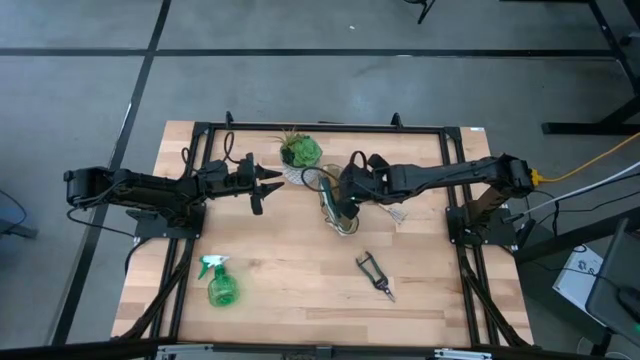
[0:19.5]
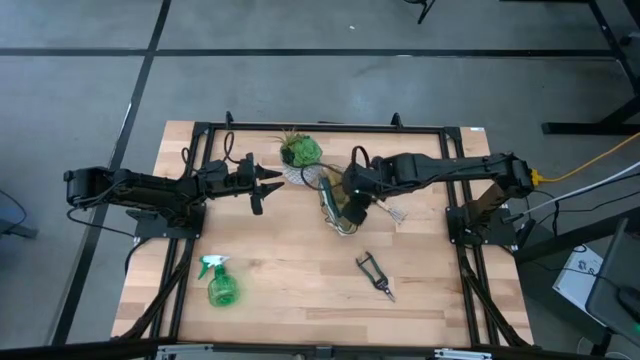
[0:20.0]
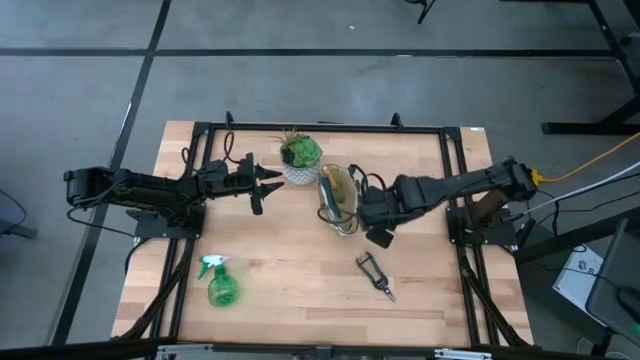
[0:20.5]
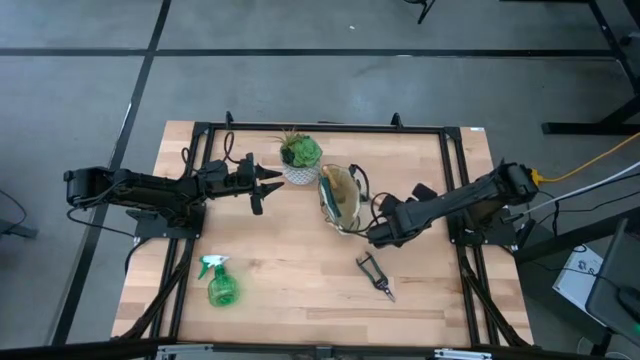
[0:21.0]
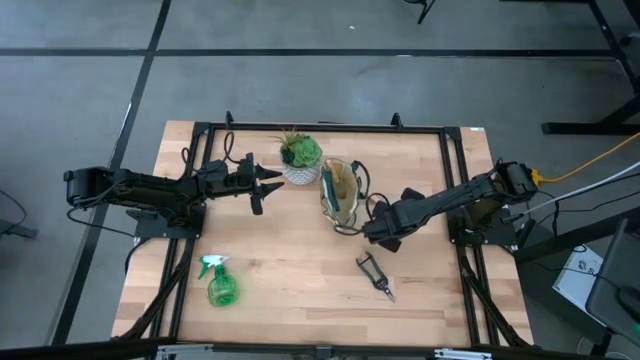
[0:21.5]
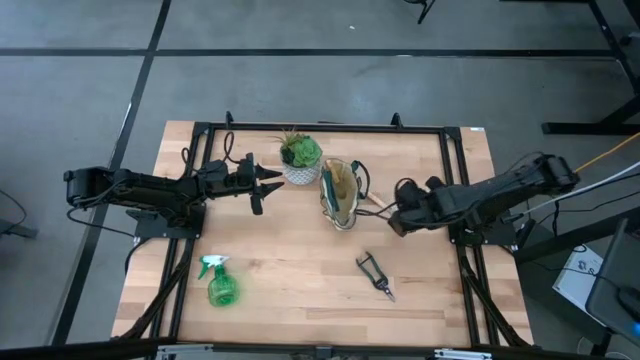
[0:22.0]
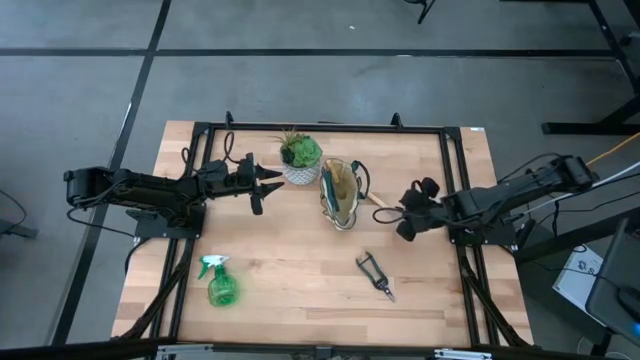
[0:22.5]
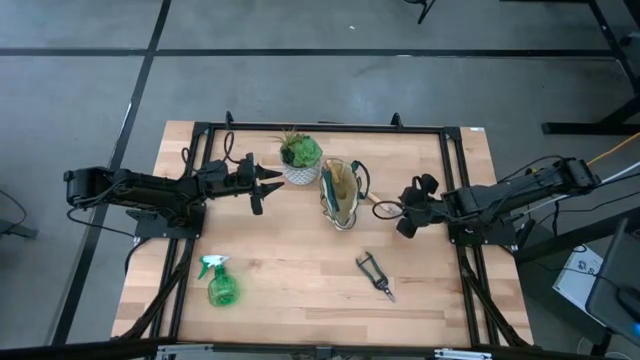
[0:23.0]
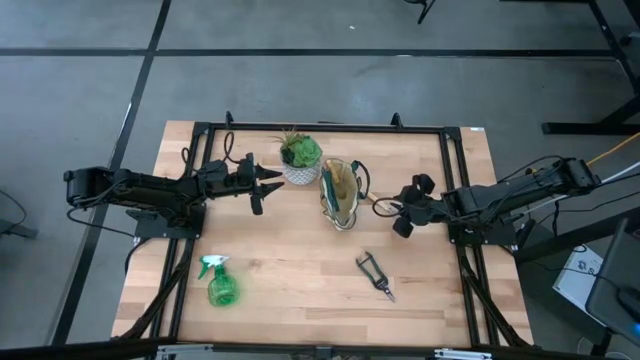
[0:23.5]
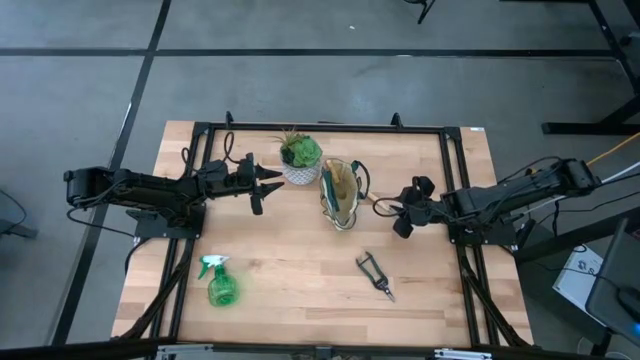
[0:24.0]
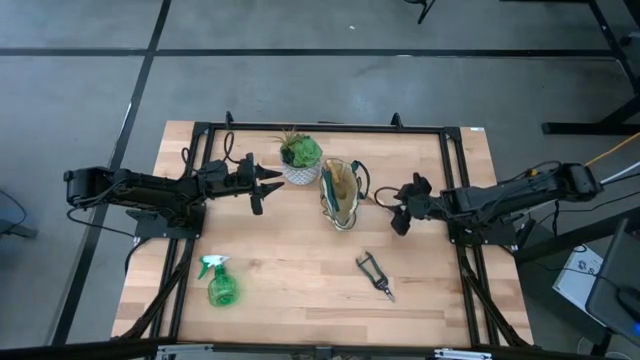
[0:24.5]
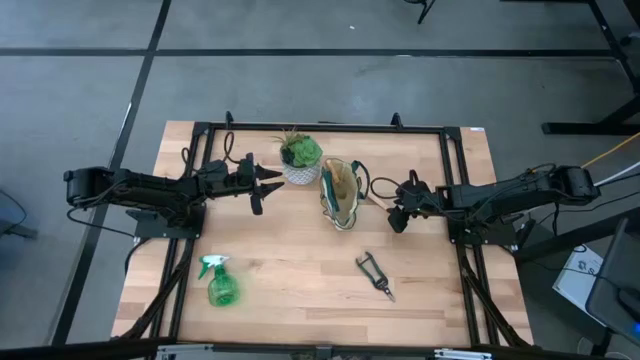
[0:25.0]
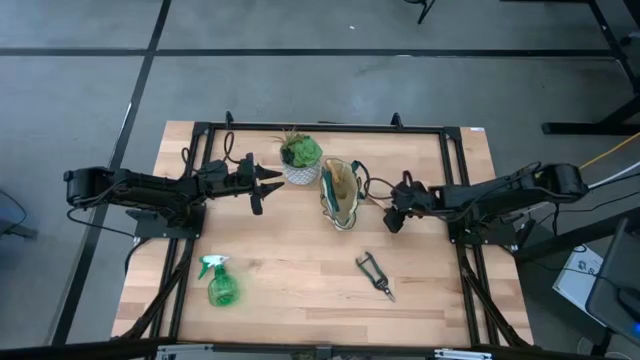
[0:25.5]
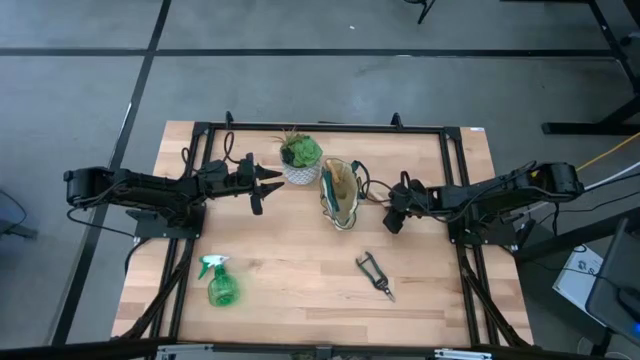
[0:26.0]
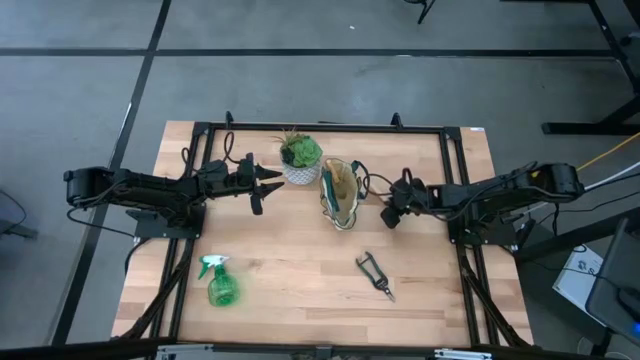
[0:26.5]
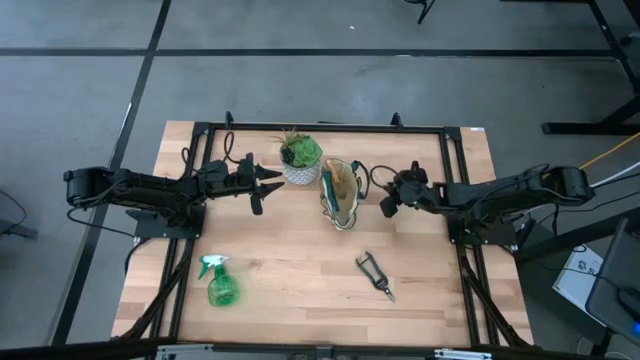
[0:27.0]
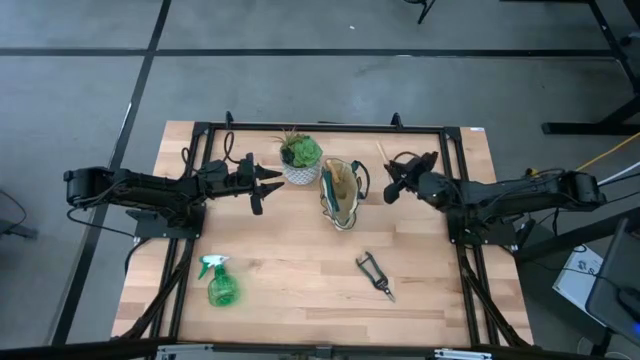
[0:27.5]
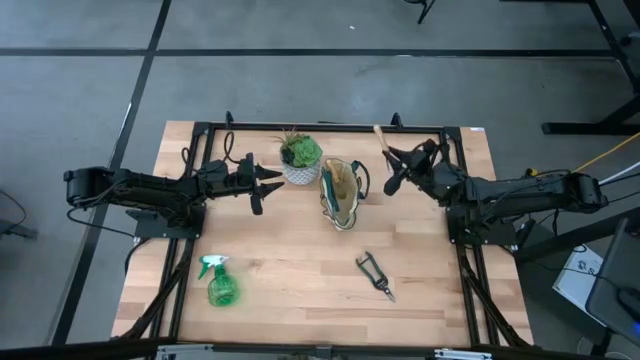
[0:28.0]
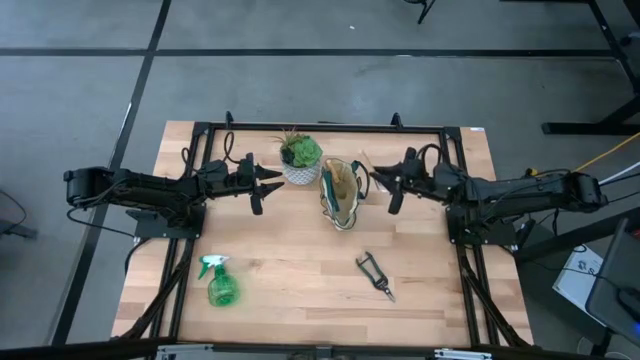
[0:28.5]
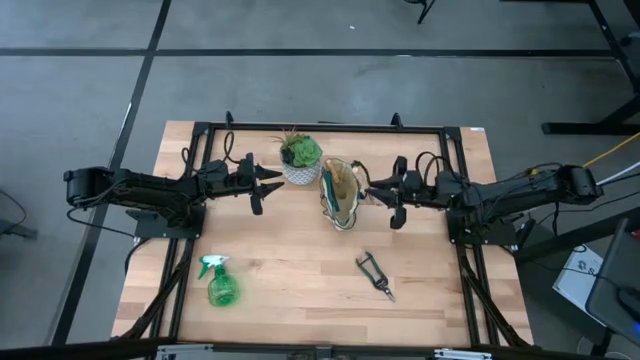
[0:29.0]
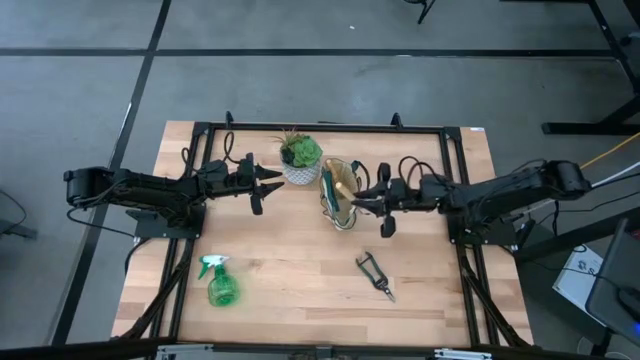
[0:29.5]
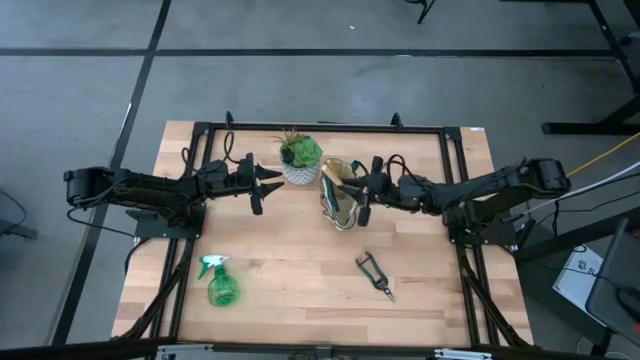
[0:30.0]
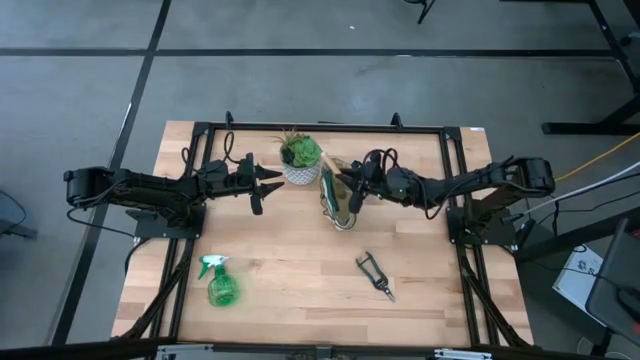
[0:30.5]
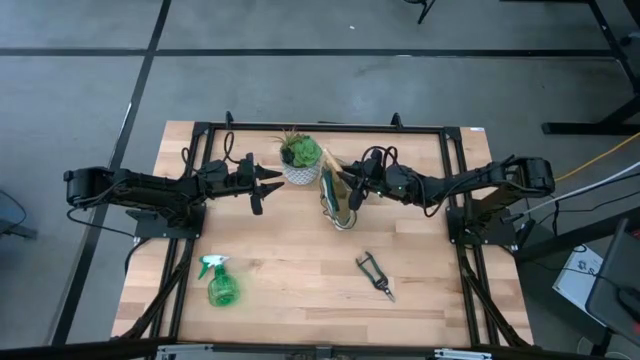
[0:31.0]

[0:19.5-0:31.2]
Task: Pick & Place Garden tools in Gardening bag
Put the hand rake into the gardening bag

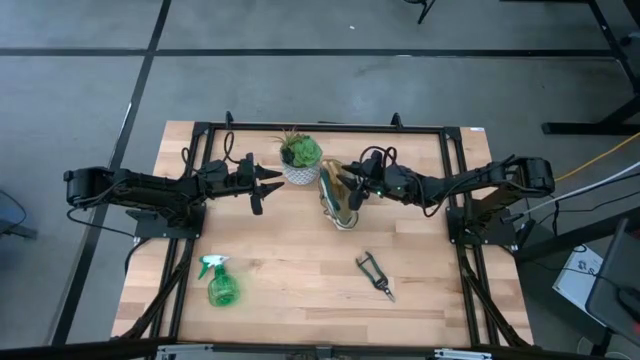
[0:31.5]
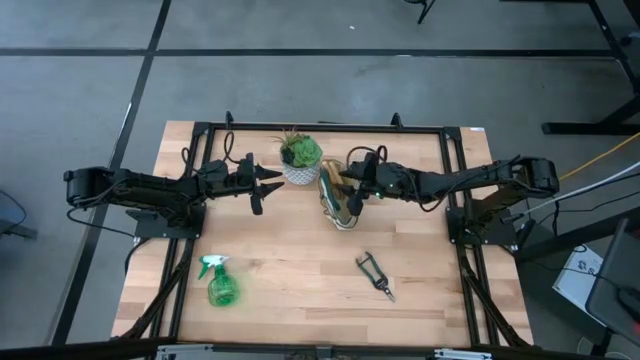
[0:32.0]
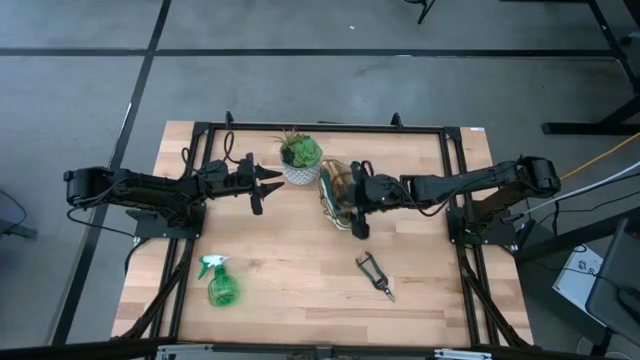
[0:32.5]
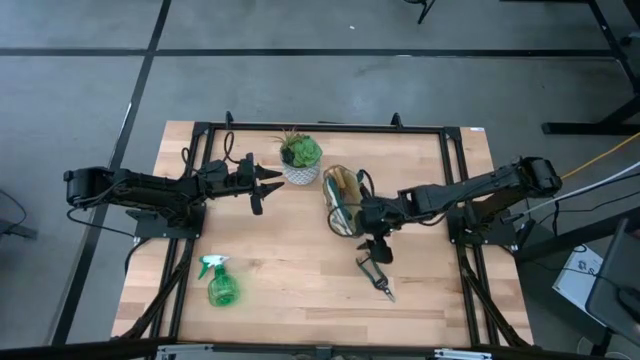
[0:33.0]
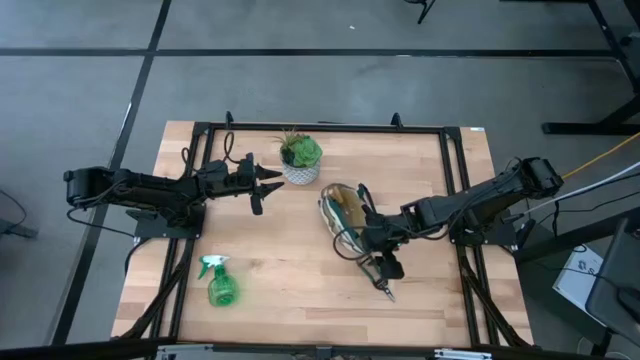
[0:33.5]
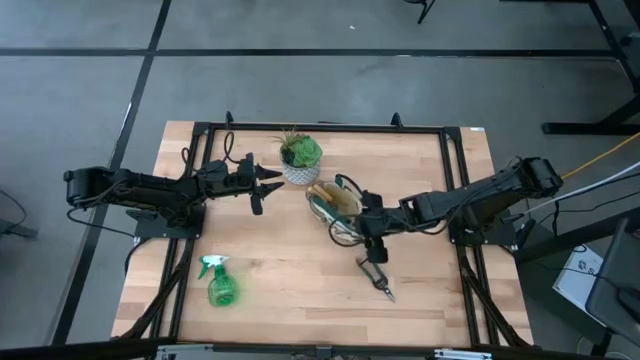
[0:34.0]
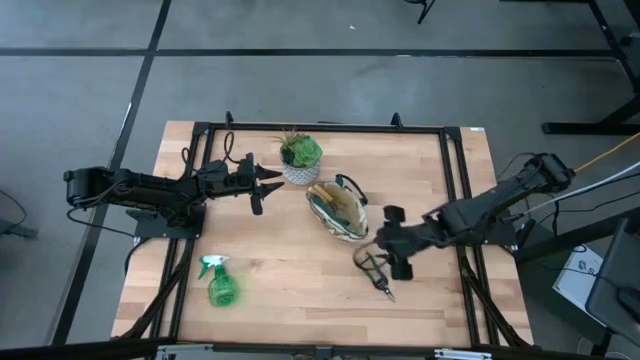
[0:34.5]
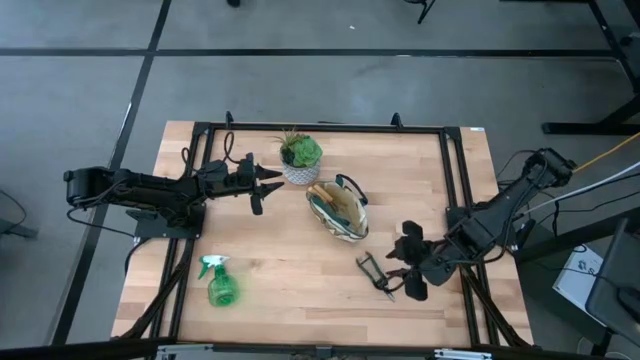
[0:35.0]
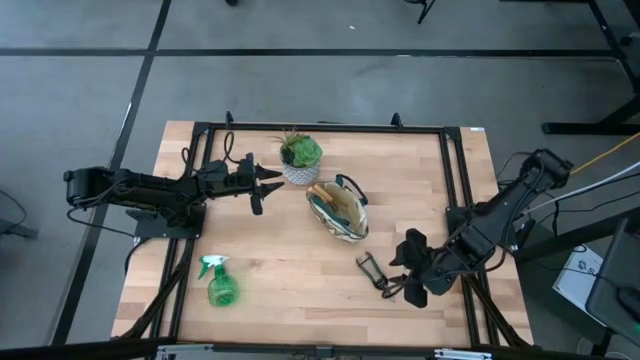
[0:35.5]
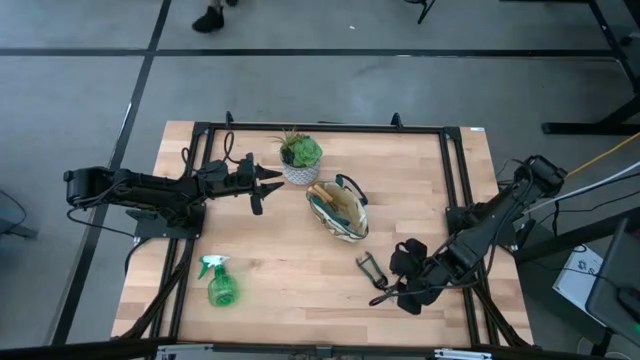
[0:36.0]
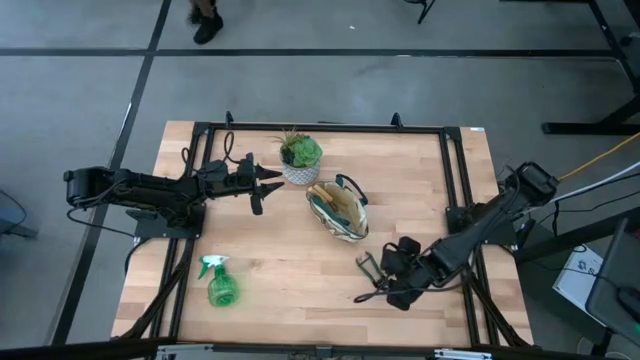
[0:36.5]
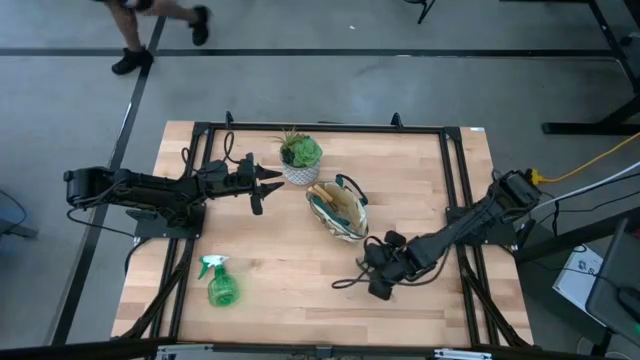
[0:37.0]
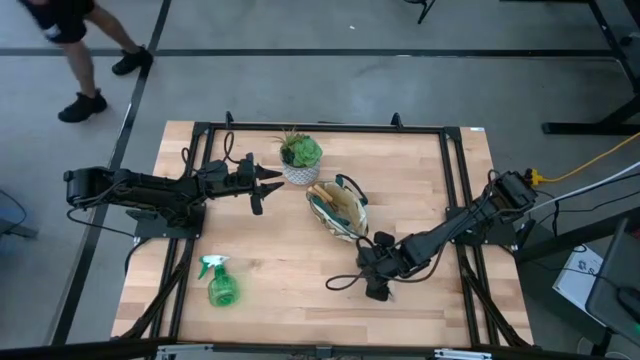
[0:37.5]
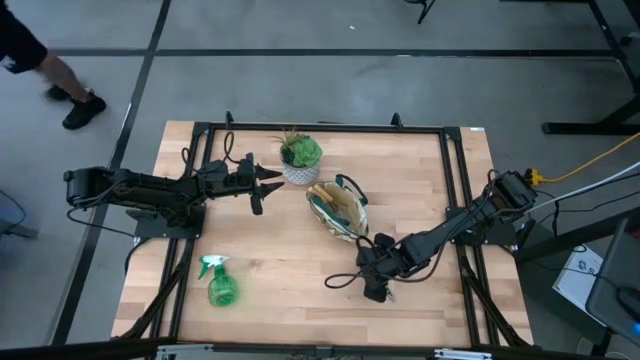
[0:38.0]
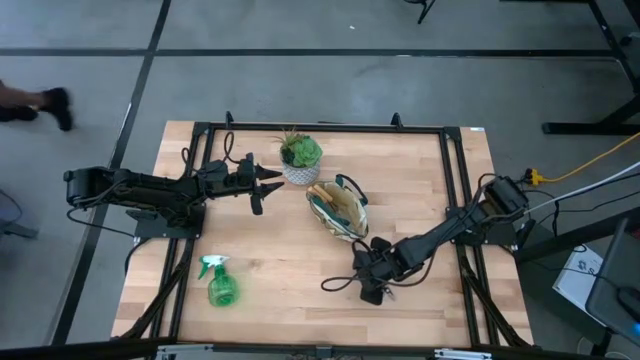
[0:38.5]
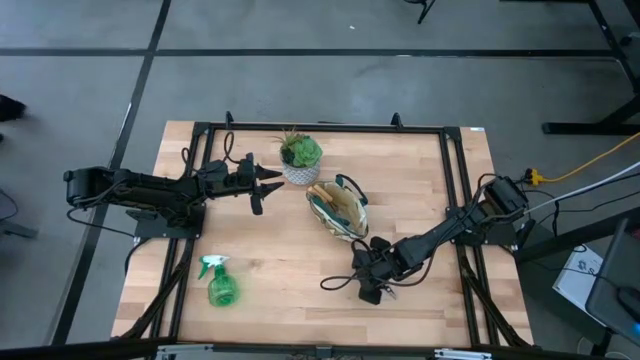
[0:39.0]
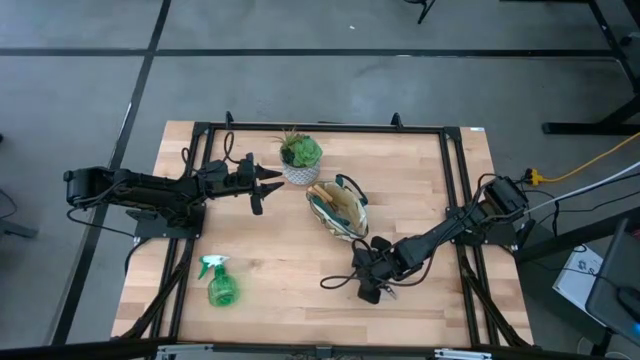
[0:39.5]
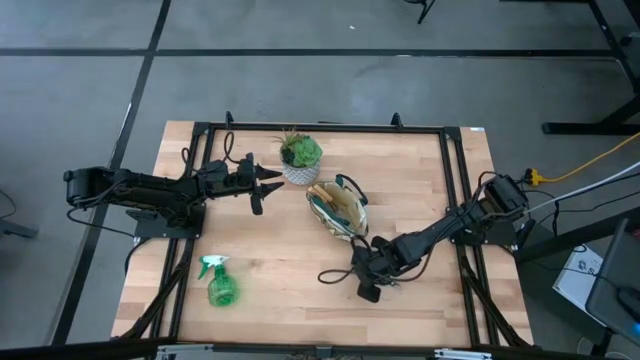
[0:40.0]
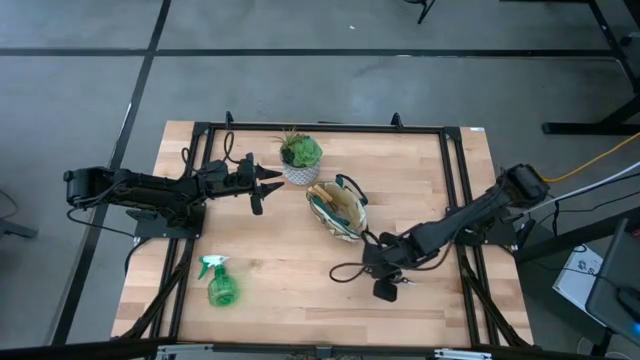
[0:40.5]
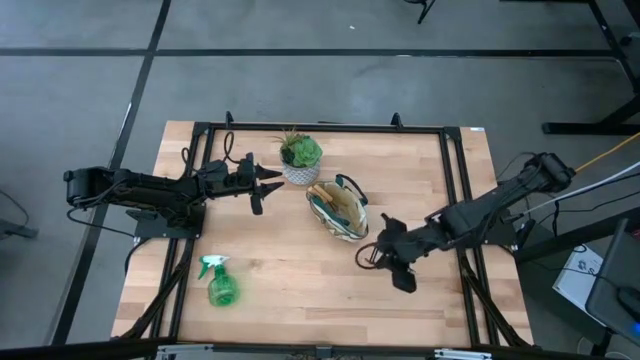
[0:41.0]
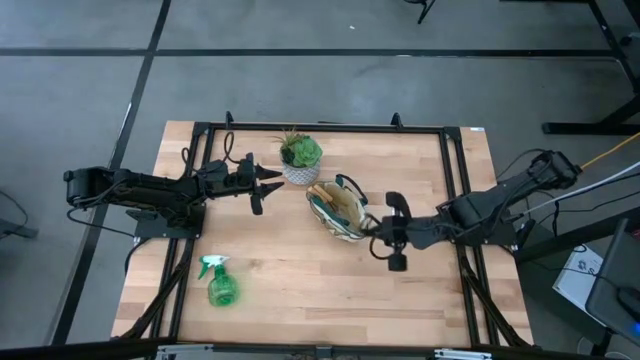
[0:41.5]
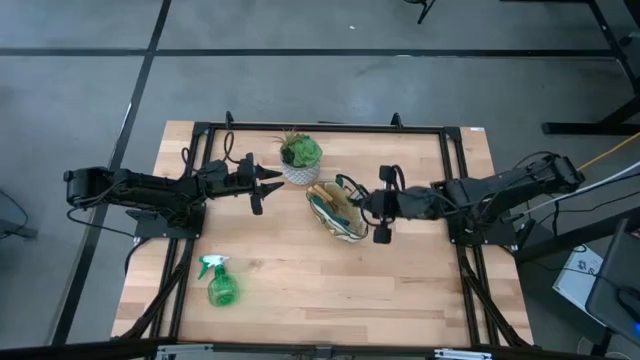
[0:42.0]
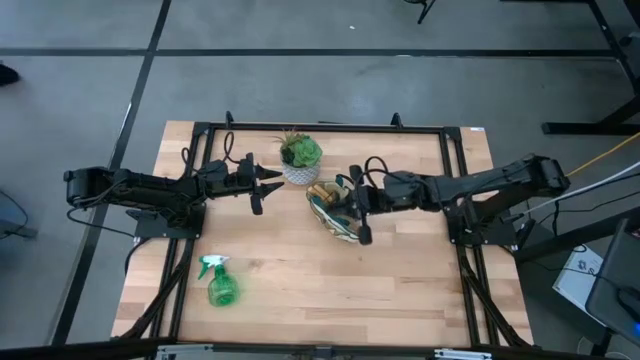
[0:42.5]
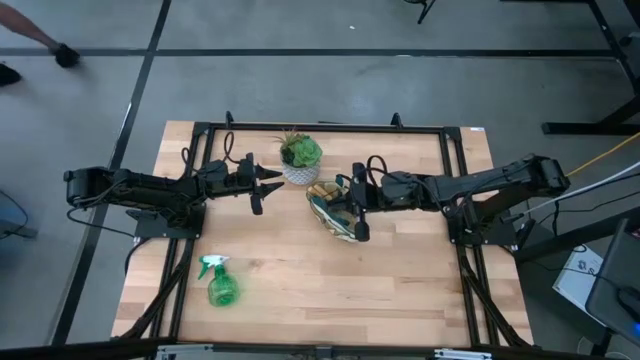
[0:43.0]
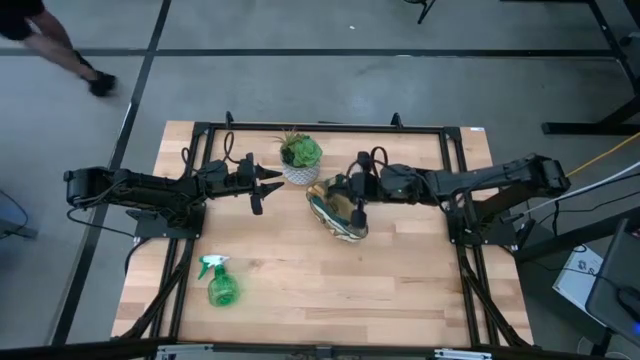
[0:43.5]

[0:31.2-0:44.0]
Put the shear scissors into the gardening bag
